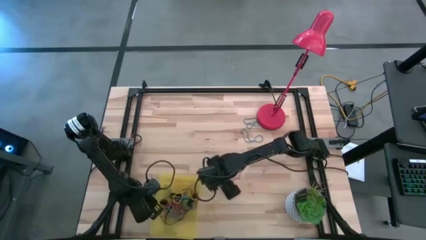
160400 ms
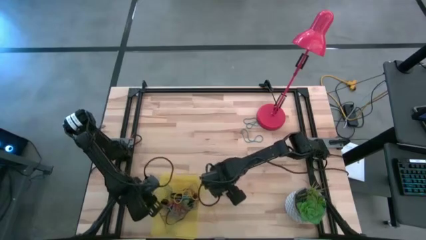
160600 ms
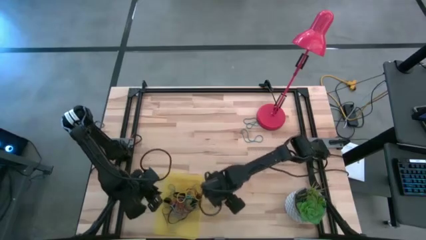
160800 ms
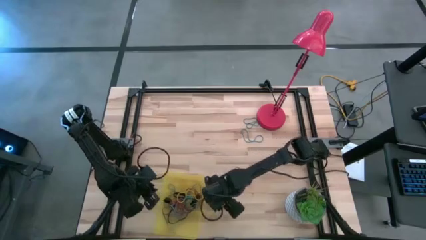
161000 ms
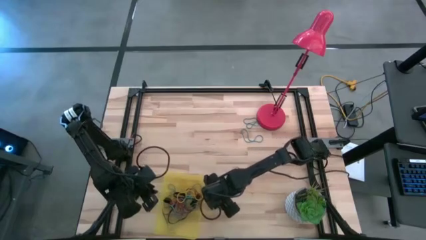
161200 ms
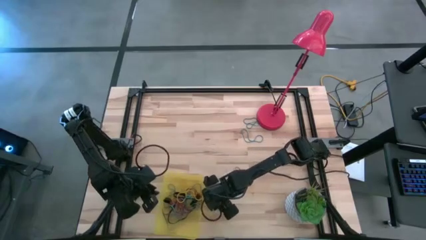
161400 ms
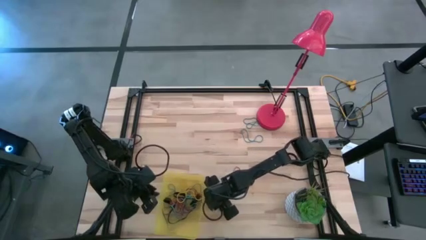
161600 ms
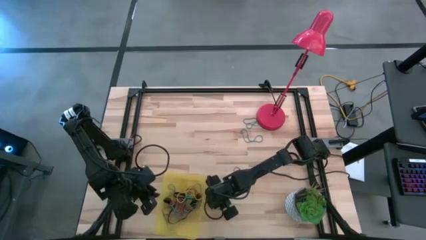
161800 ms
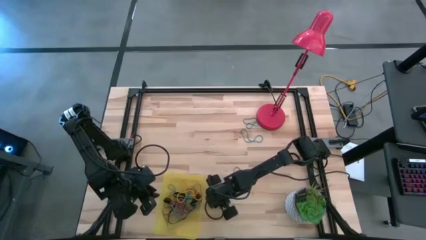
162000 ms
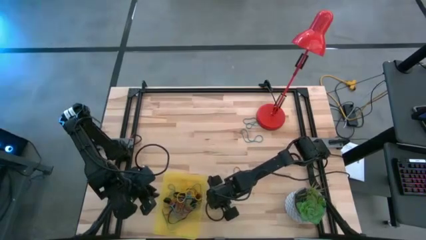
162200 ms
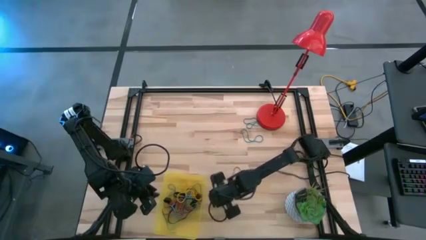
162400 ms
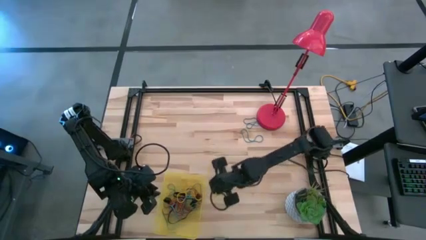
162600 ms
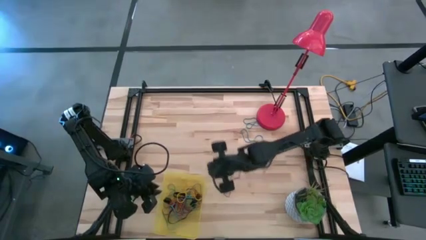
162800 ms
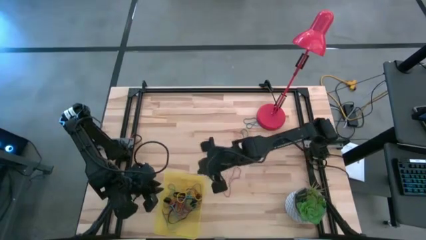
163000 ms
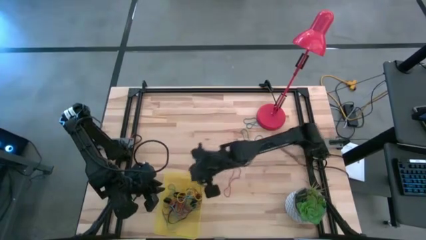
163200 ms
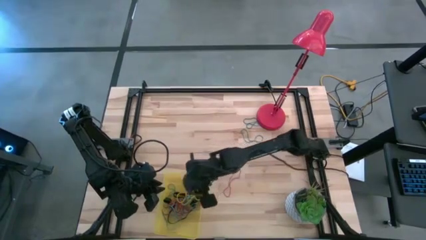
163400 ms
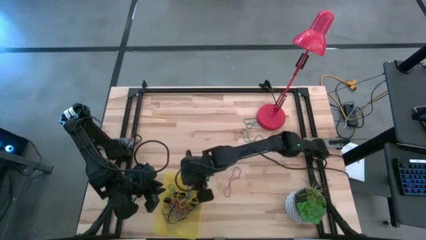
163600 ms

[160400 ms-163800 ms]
Task: Pick and place rubber bands into bin
Put the yellow rubber band into the bin

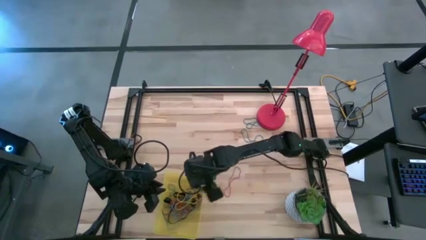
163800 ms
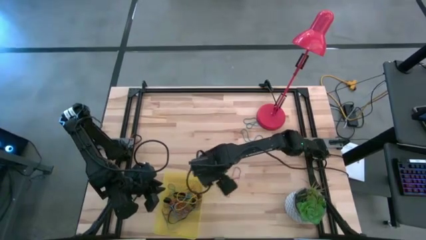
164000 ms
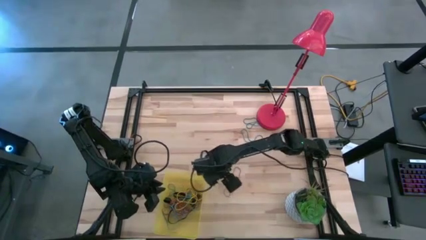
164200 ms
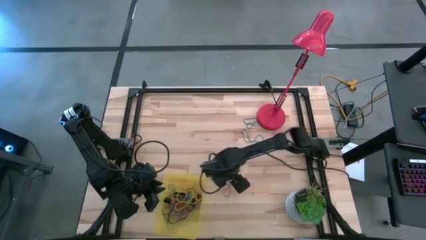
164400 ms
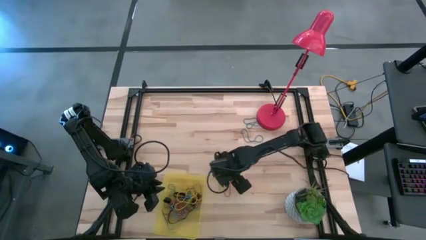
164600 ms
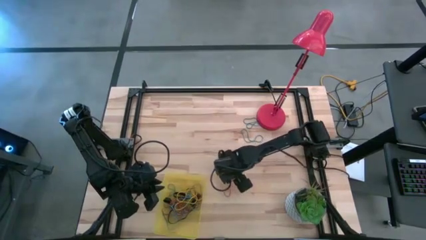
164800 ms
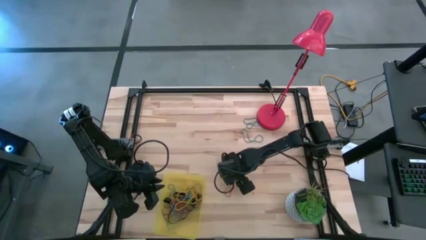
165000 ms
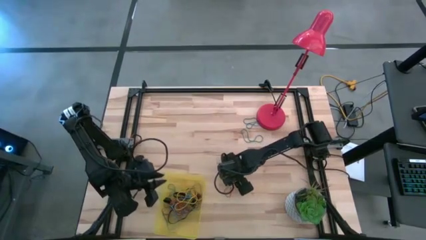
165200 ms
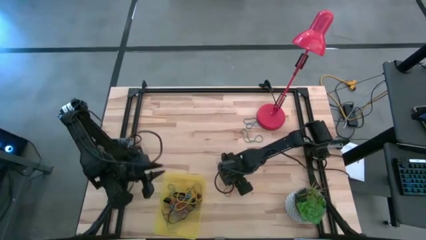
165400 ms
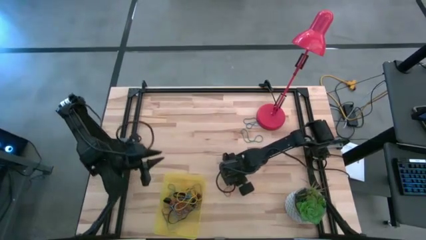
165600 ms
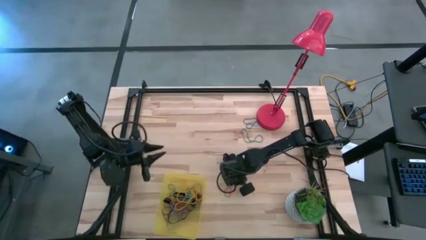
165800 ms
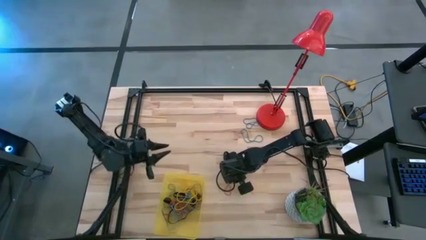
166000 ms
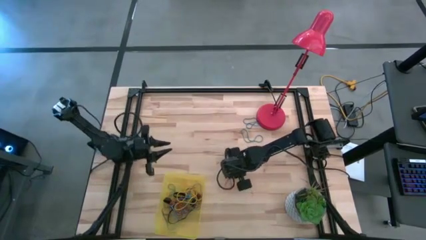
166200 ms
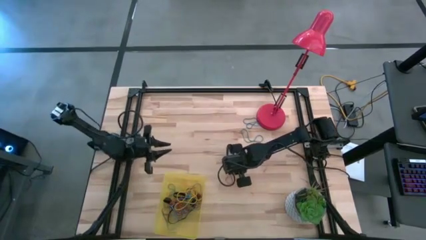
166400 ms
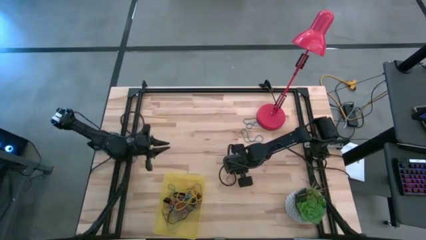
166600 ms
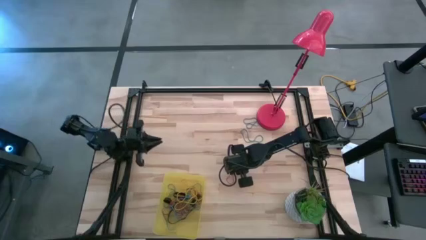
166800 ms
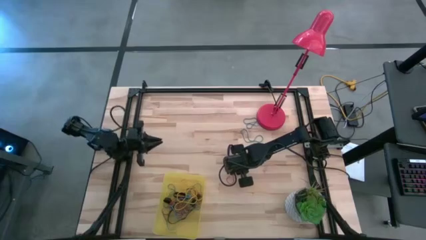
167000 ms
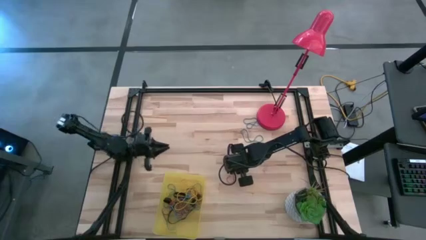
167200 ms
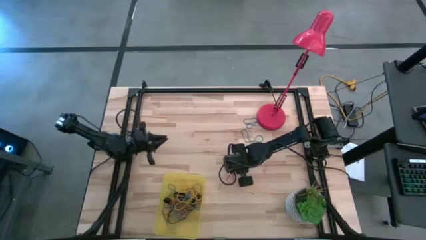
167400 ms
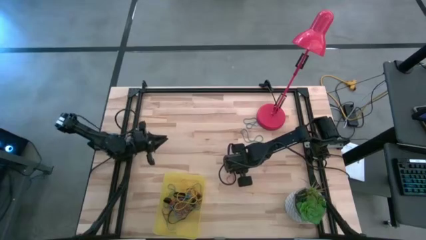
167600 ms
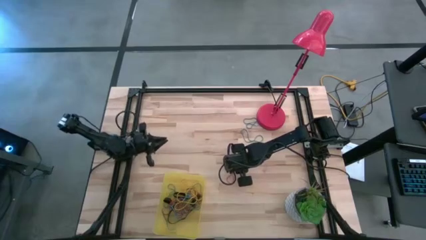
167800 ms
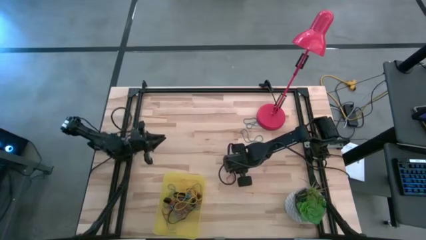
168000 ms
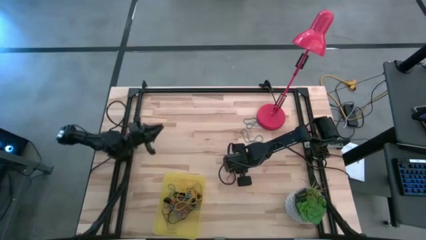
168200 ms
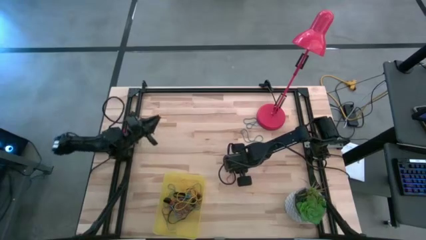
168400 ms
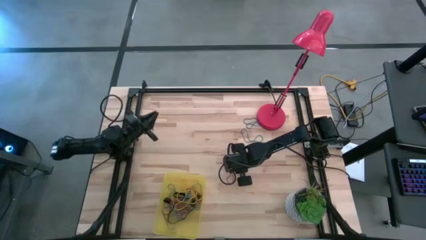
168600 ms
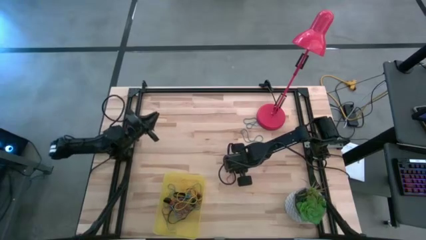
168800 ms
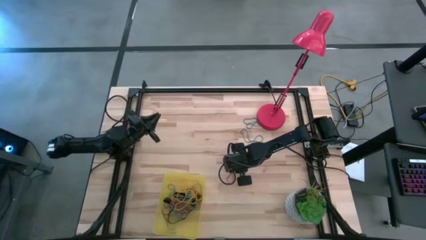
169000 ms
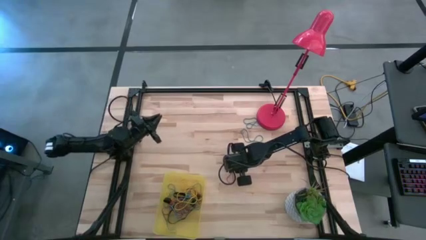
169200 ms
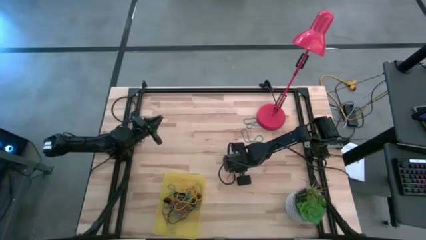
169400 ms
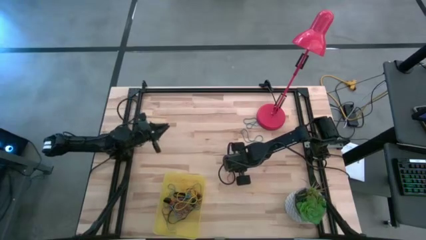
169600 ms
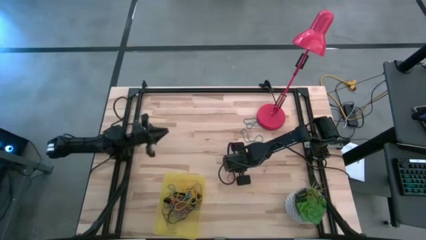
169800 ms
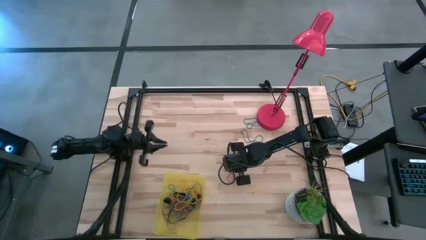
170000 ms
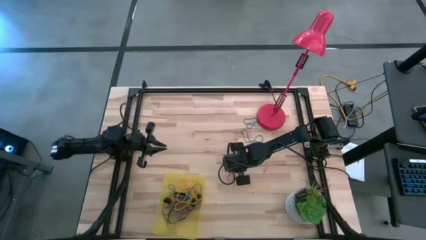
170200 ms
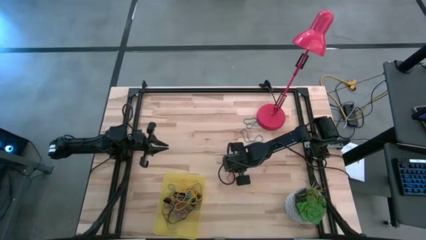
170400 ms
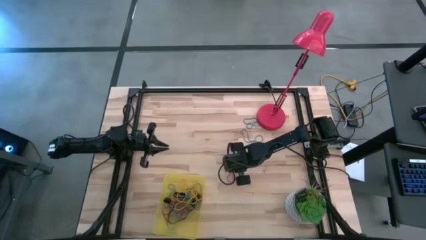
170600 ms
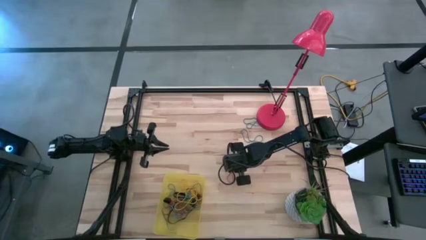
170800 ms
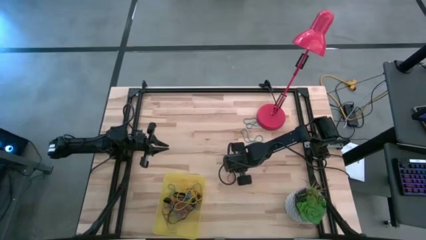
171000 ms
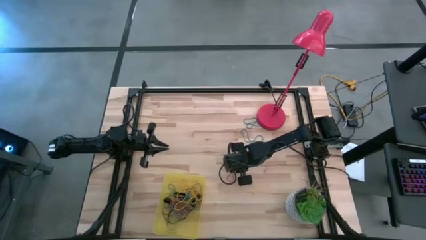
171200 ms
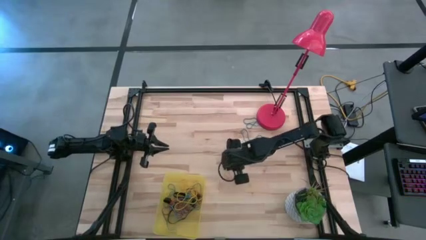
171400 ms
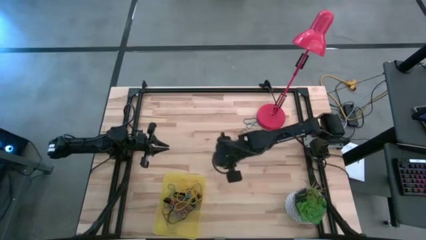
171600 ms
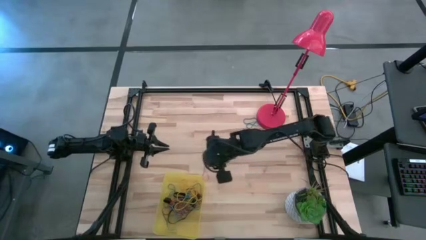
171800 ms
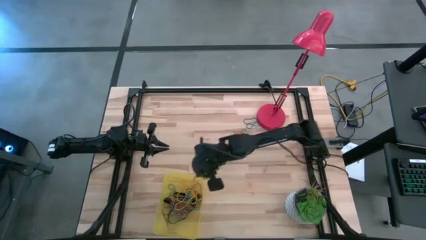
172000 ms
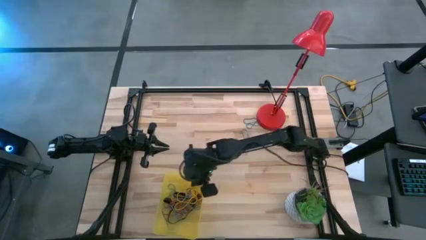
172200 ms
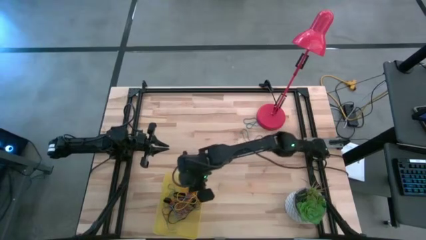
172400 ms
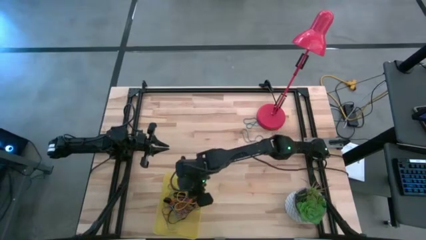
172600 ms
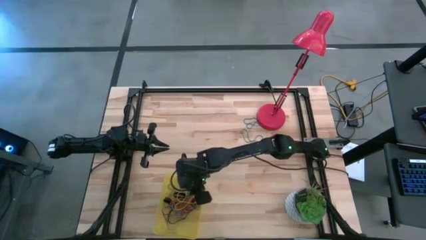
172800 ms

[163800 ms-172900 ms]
Put the red rubber band into the bin

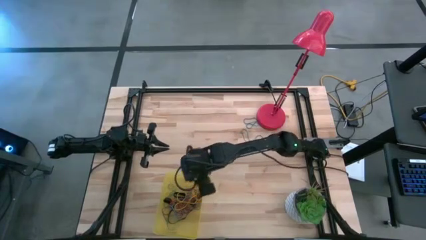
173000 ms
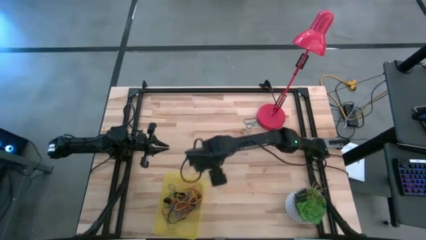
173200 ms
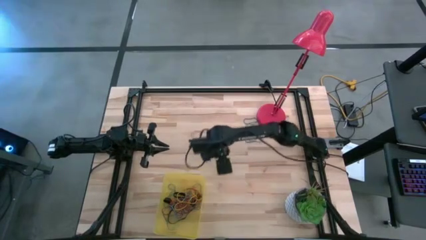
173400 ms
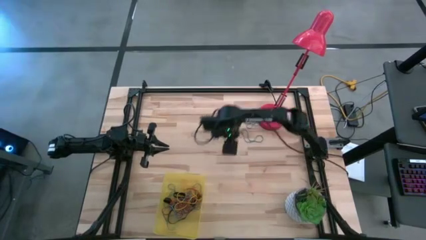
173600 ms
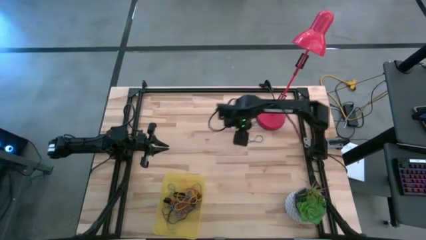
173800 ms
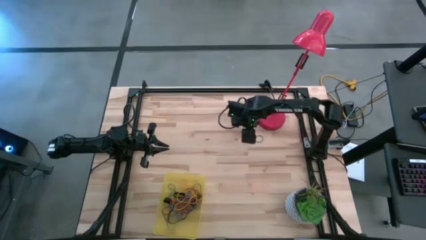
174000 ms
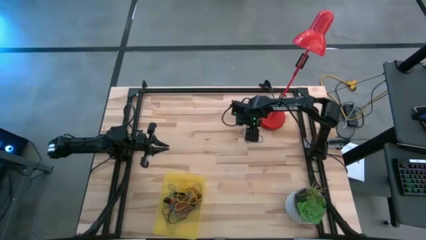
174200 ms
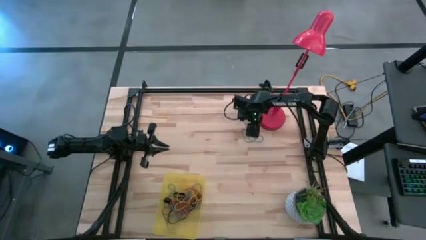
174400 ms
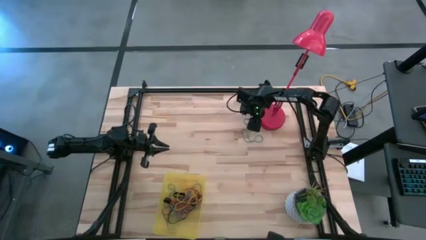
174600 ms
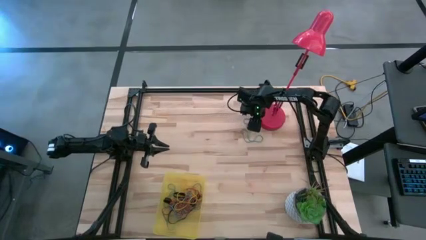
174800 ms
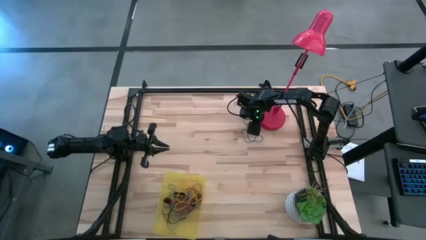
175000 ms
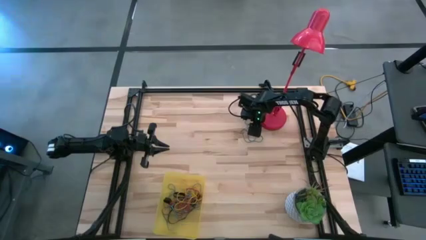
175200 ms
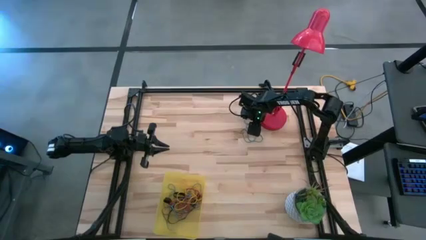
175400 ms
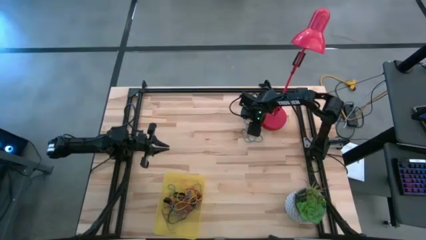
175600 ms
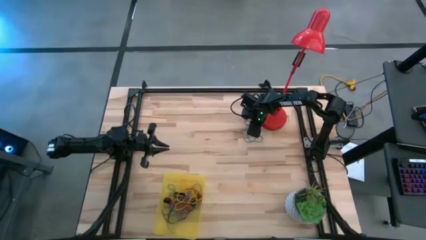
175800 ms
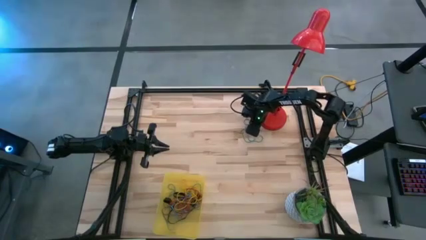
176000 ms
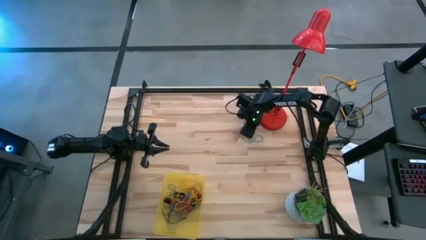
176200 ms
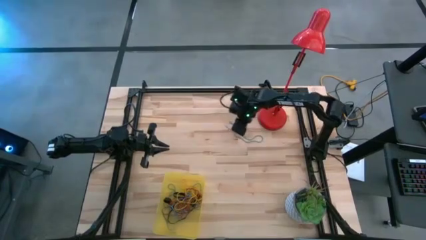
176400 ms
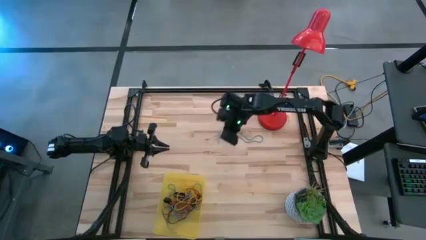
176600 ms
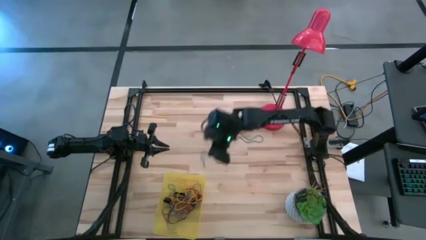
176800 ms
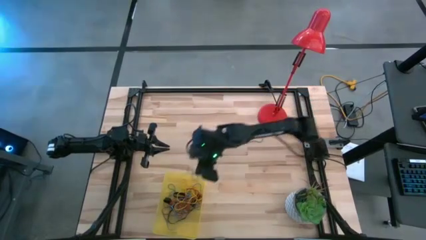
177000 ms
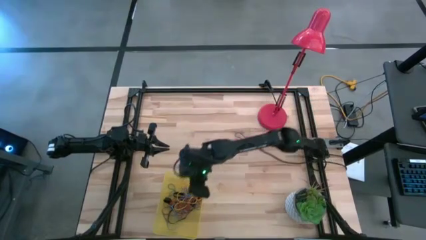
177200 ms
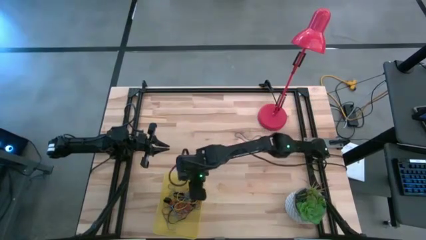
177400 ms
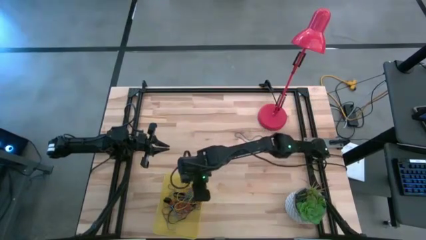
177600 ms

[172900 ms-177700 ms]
Put the blue rubber band into the bin
